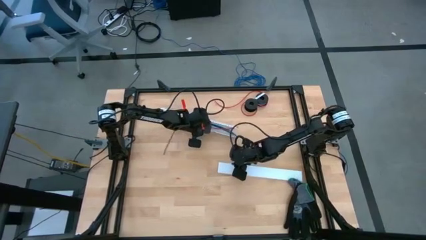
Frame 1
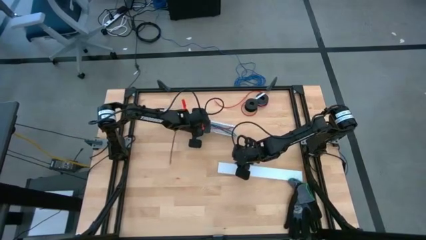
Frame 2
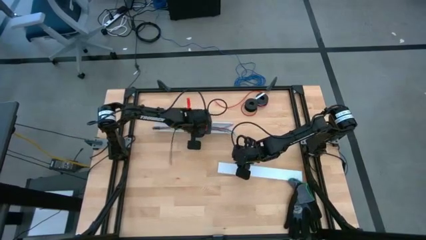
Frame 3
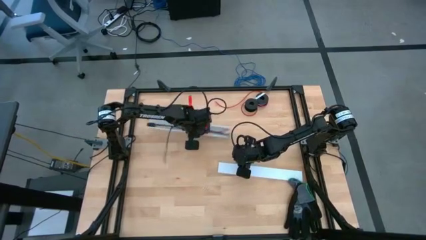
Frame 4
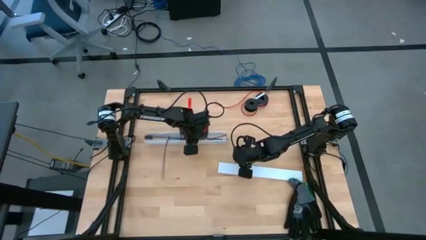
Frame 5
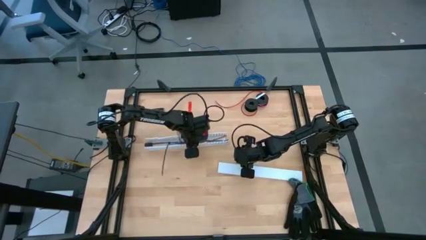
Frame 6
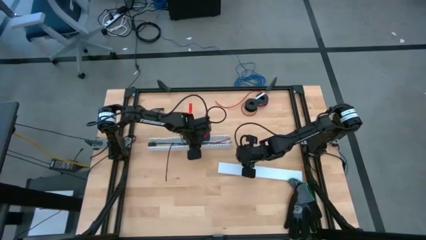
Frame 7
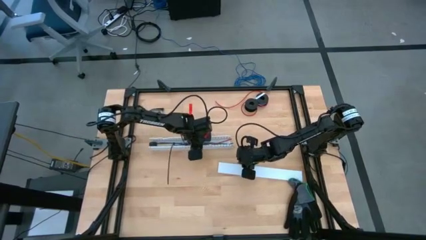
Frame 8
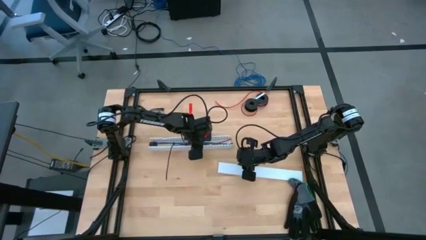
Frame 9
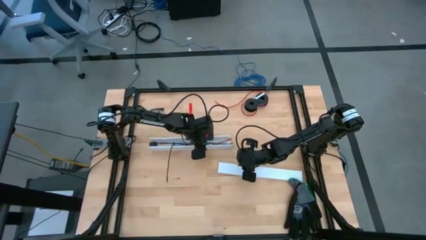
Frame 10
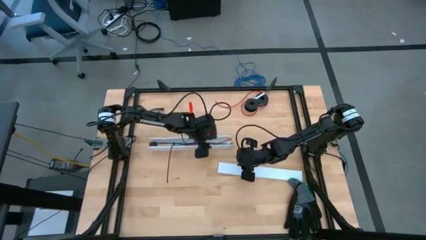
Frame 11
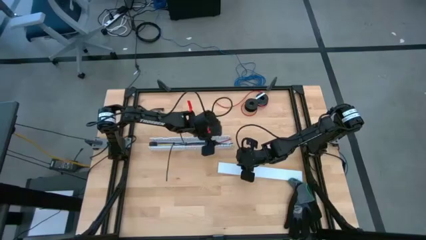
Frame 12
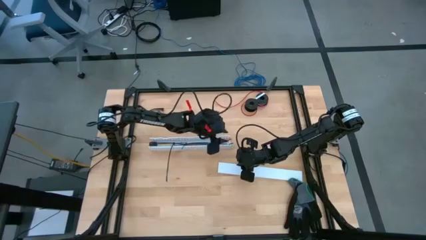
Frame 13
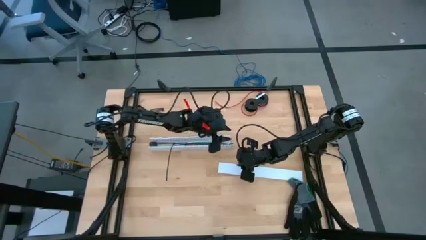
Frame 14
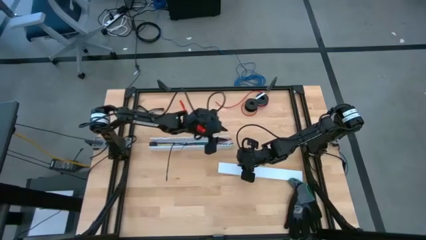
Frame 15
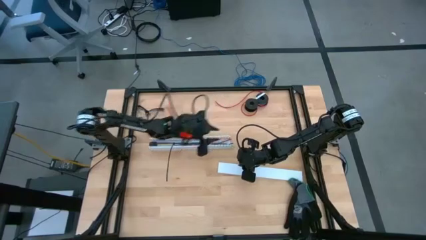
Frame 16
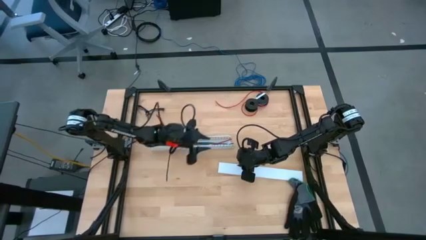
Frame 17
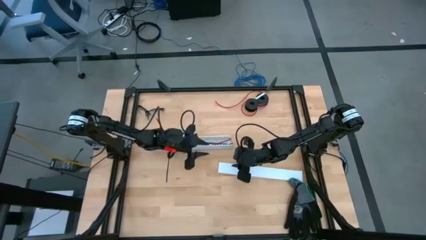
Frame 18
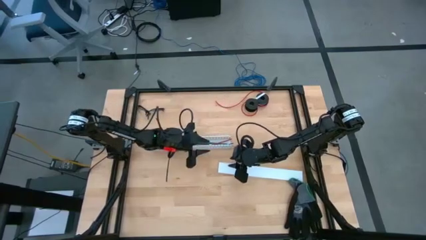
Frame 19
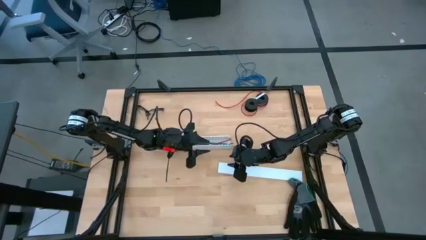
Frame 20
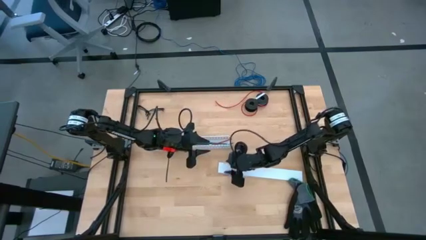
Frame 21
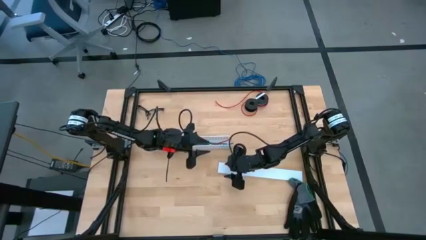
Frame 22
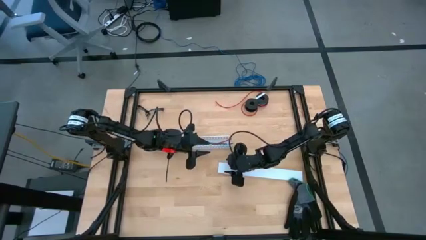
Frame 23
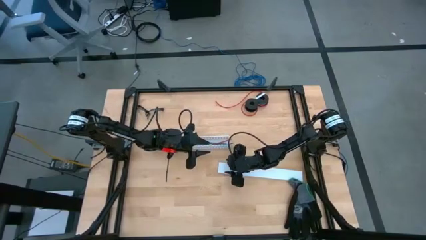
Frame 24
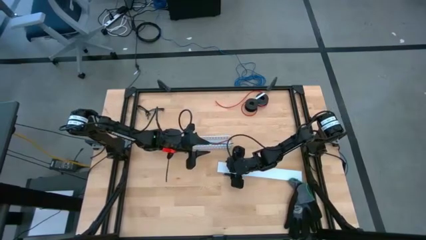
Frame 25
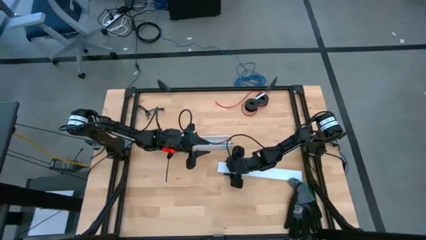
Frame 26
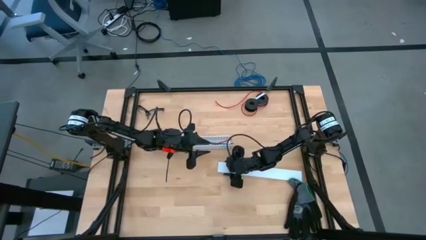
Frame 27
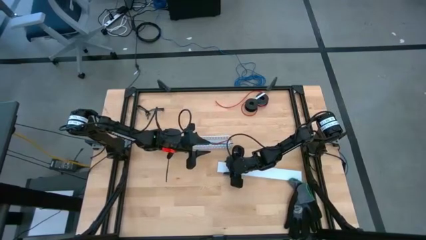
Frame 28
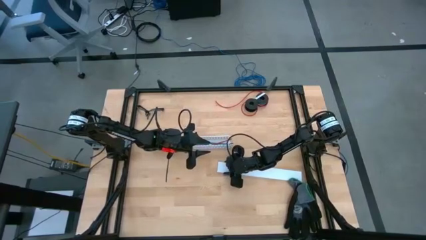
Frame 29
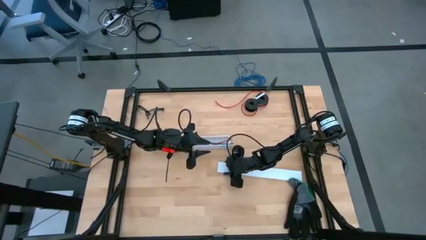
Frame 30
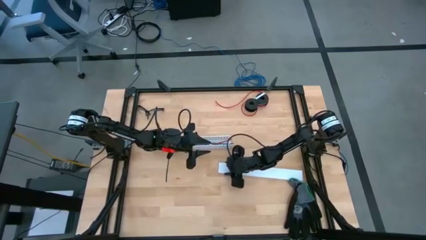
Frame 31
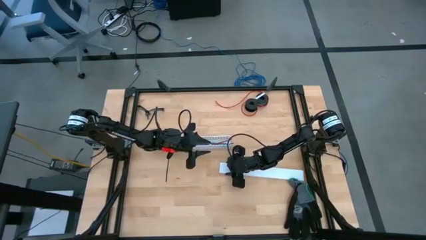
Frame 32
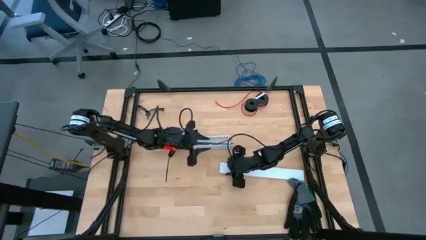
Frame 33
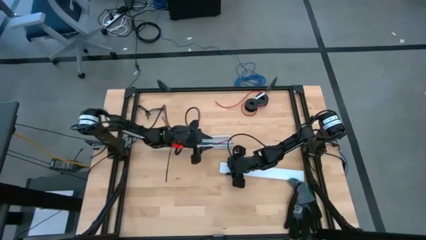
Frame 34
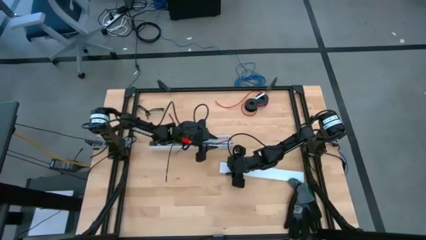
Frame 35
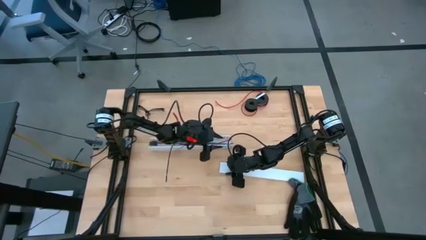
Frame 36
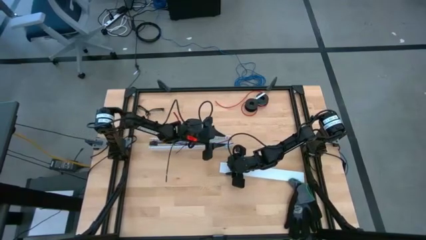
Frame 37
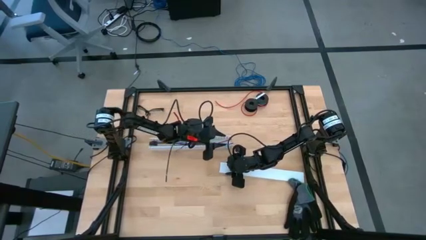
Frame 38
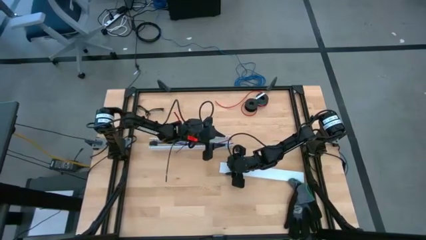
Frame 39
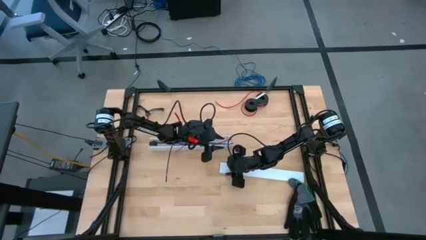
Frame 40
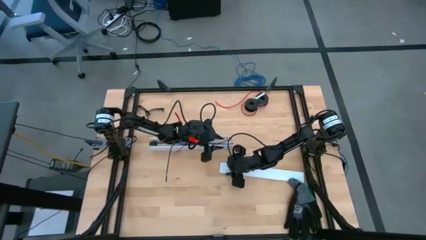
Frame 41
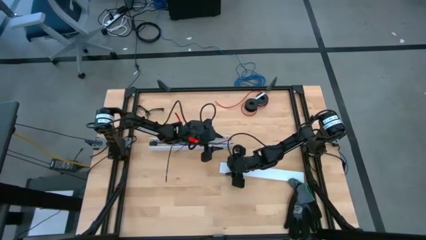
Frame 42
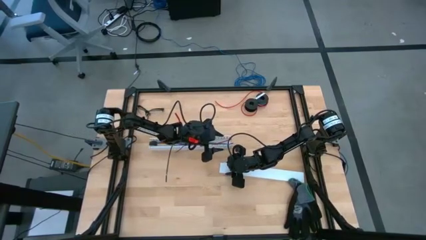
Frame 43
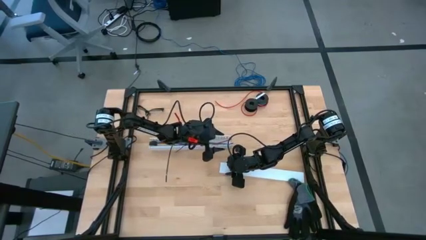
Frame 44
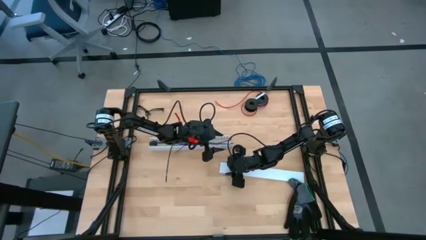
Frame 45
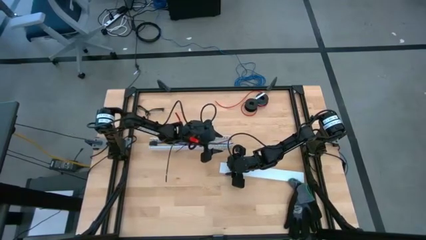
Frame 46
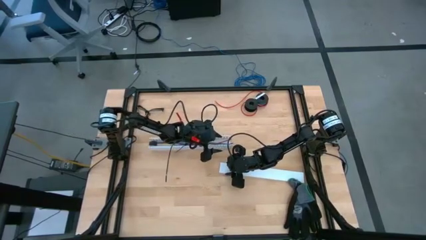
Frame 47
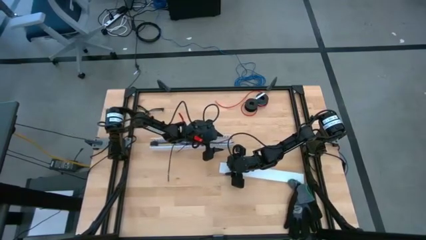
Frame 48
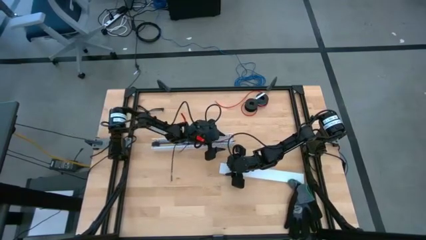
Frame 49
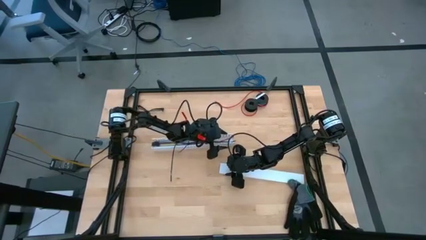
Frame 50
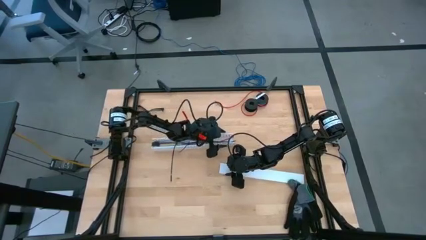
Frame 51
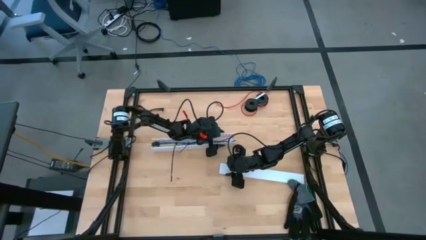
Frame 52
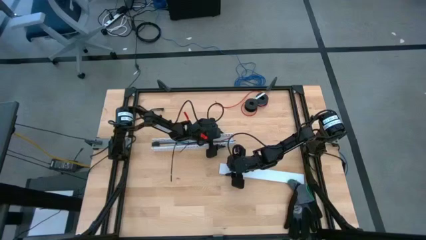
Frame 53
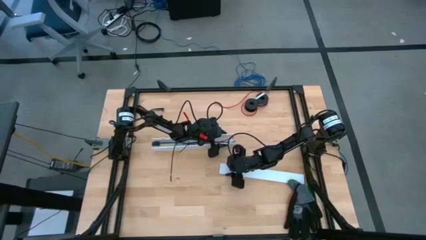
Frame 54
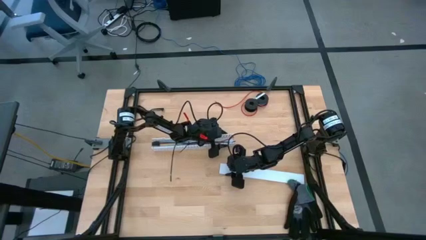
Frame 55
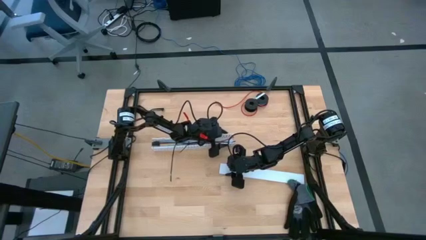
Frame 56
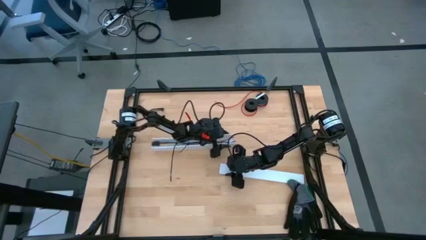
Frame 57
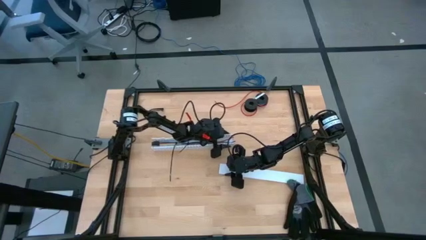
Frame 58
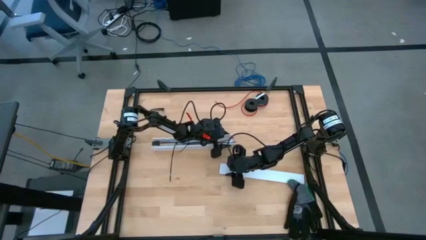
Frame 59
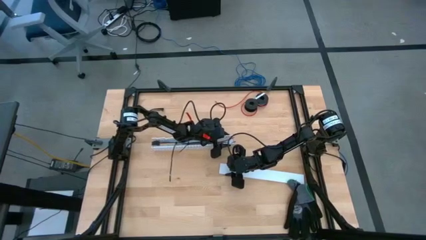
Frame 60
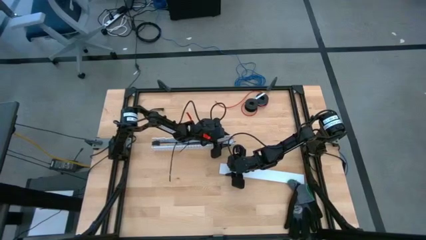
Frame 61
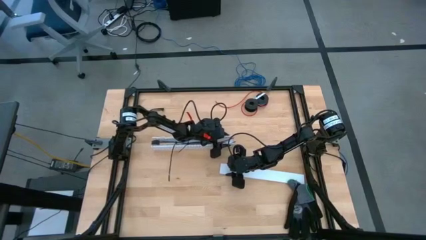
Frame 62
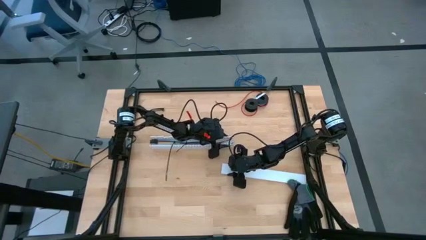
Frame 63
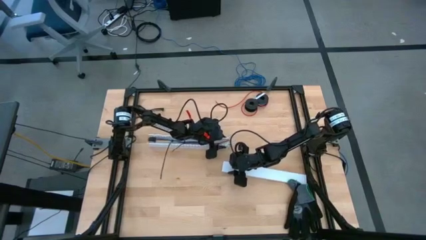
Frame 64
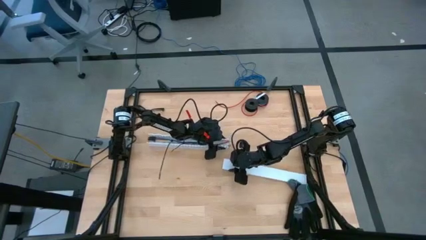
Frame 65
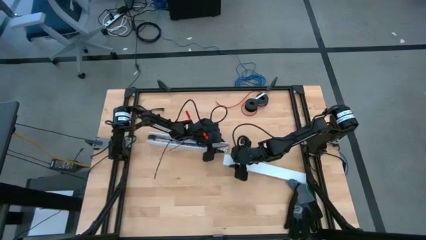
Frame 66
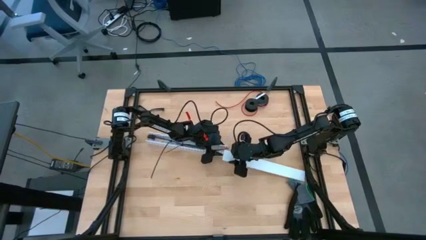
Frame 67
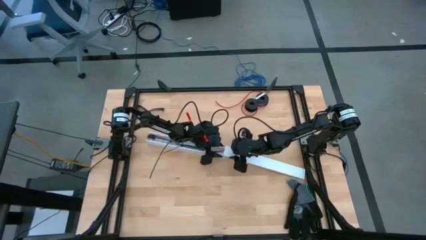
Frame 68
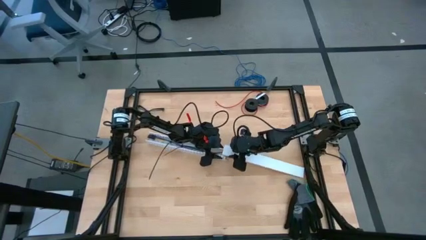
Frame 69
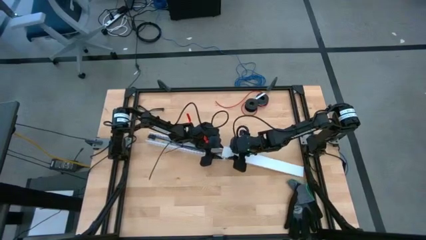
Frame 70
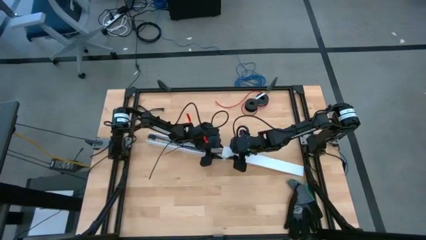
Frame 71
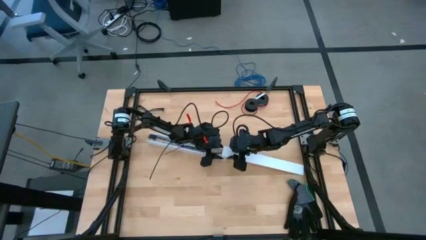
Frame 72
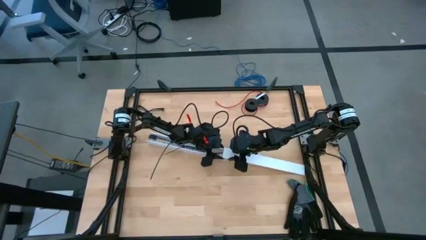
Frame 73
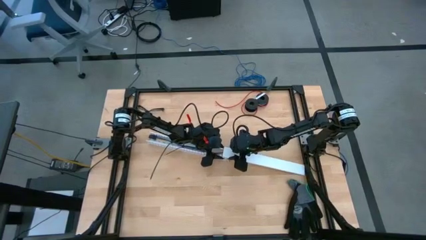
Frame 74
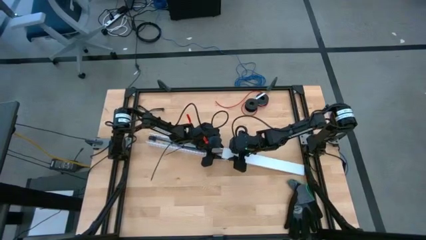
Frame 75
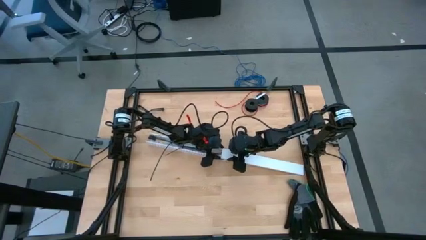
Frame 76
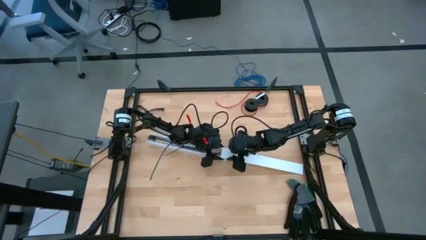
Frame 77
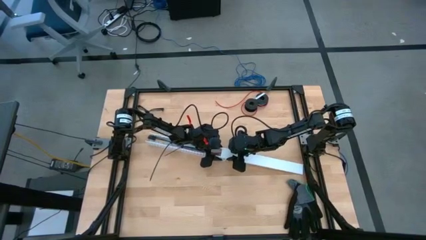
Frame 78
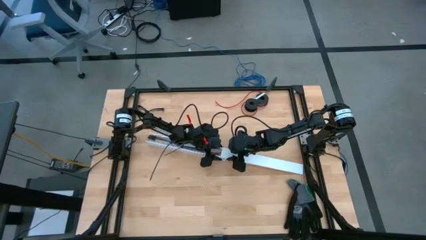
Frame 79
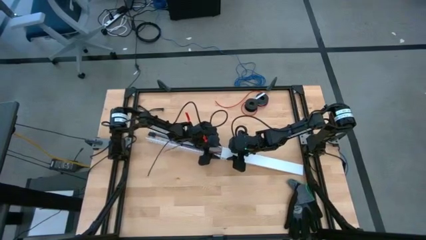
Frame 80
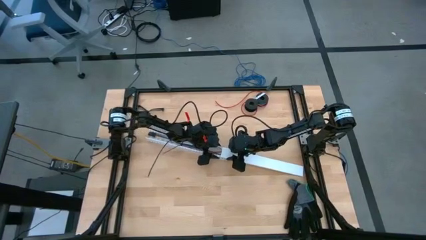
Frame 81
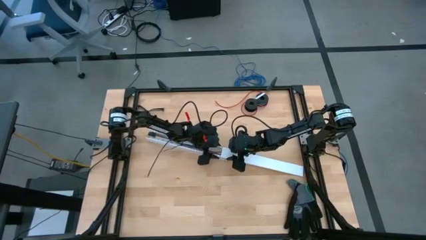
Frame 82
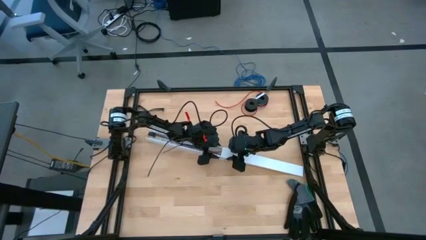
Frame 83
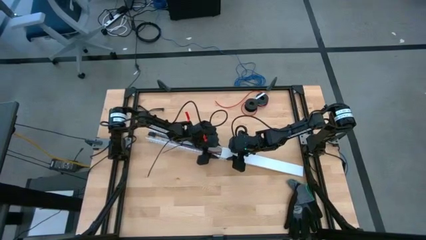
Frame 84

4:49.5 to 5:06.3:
Task: Ziptie cables
Close the white cable duct
